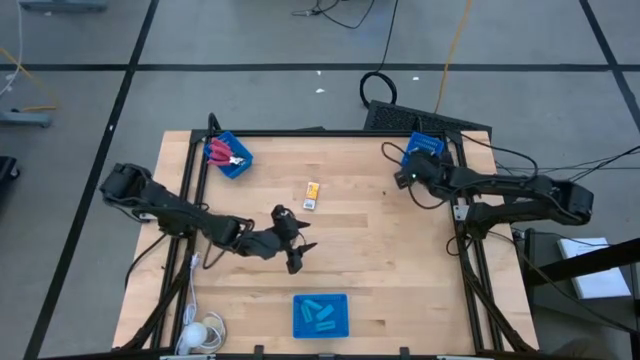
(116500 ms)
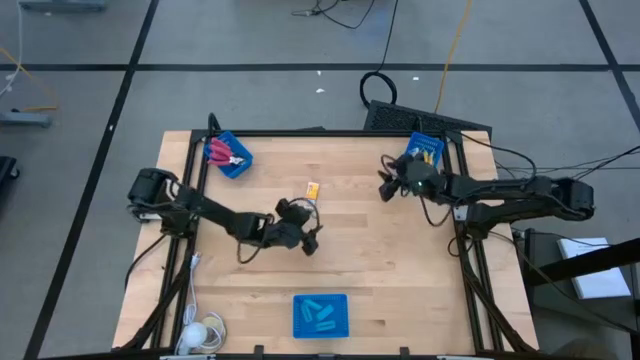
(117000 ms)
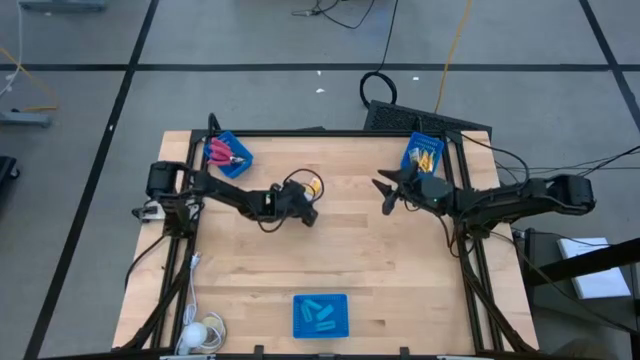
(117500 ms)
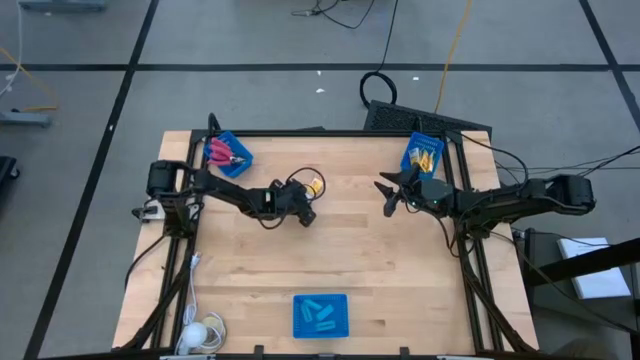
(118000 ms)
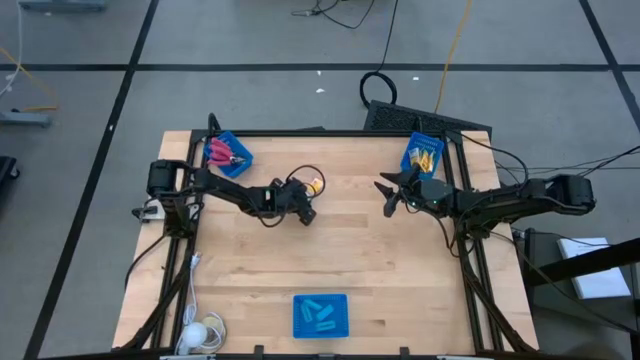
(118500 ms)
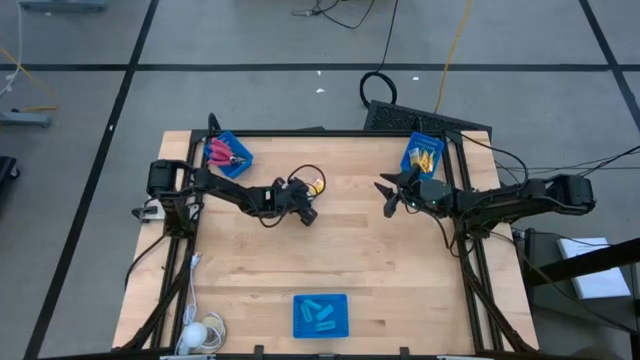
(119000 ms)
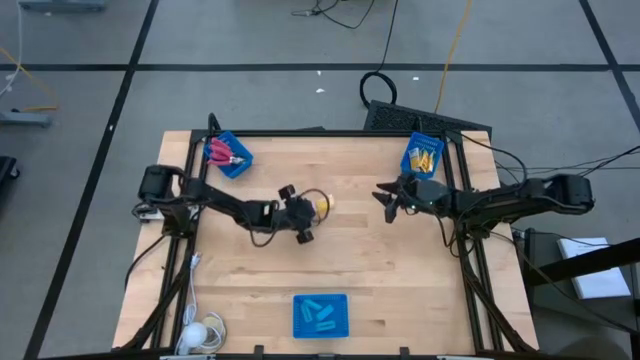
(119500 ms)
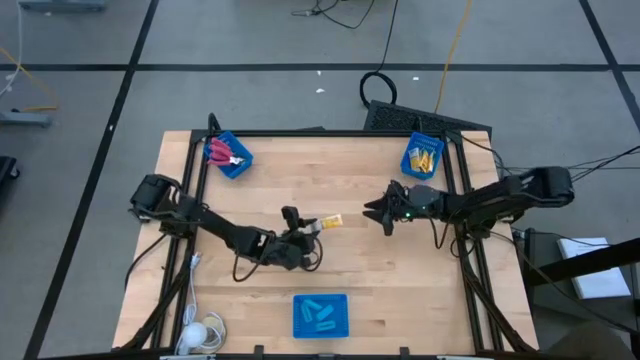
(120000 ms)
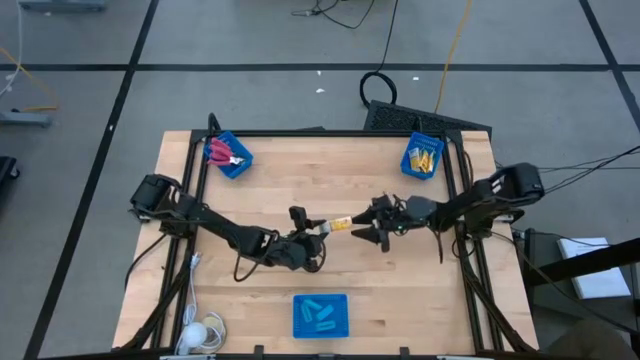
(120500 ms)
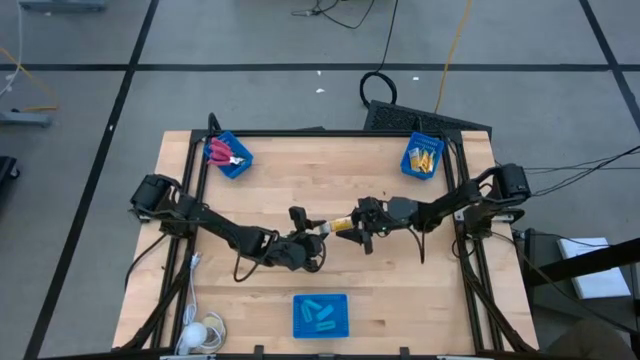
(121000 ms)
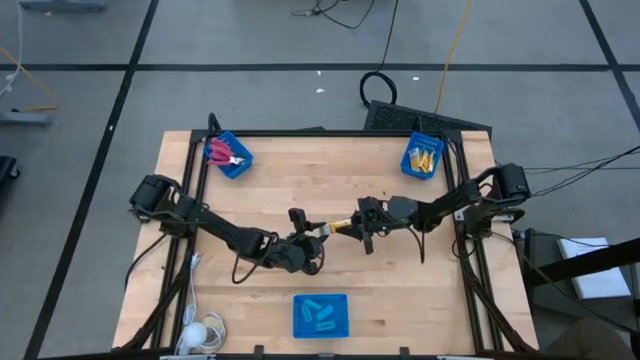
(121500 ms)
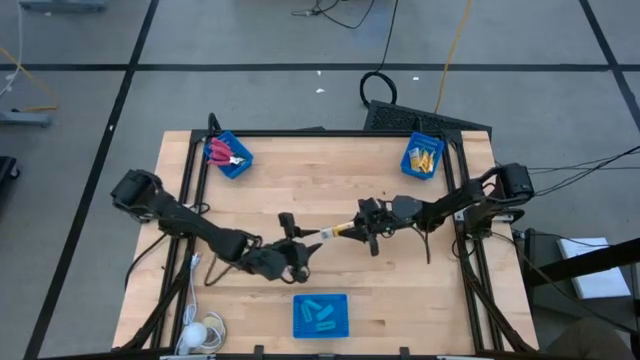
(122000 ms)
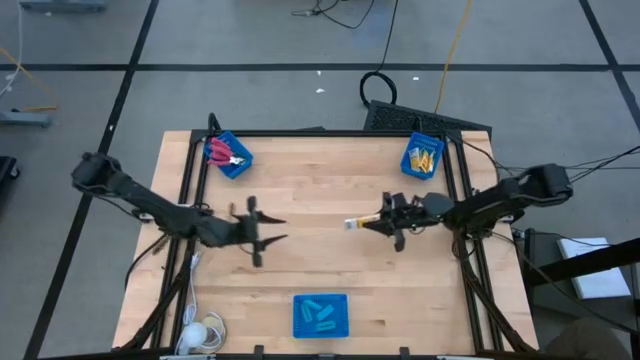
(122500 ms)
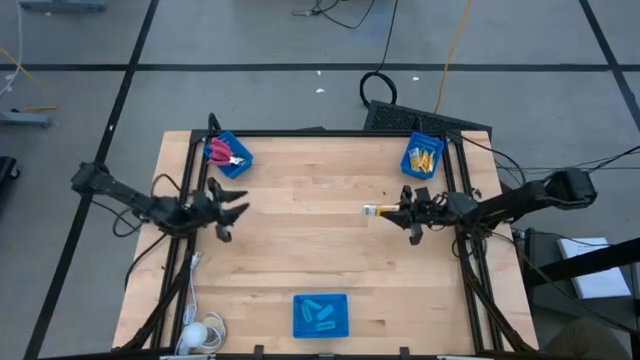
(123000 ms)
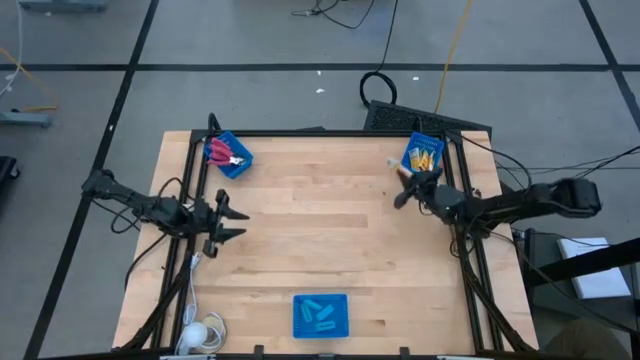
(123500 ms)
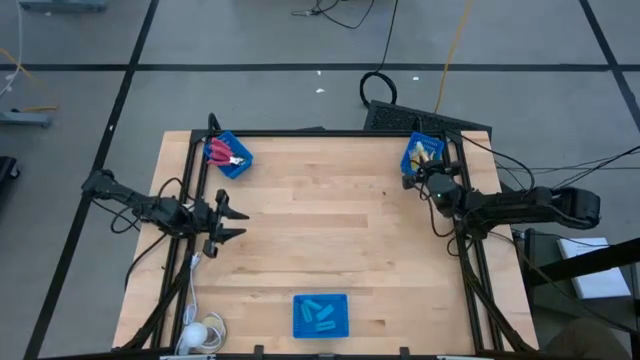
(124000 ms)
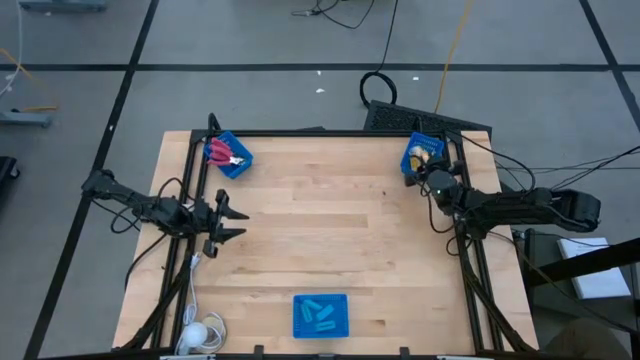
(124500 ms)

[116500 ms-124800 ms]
Task: Pick & Place School Supplies
Put the crayon box into the right blue bin

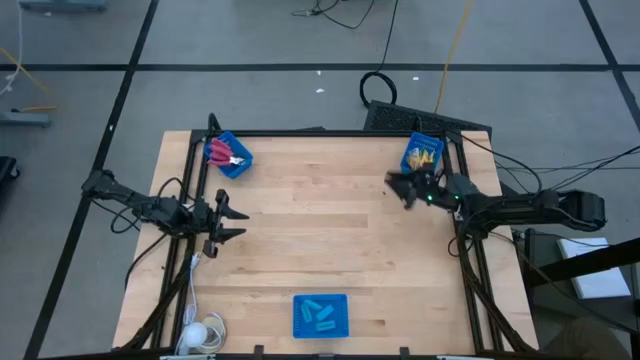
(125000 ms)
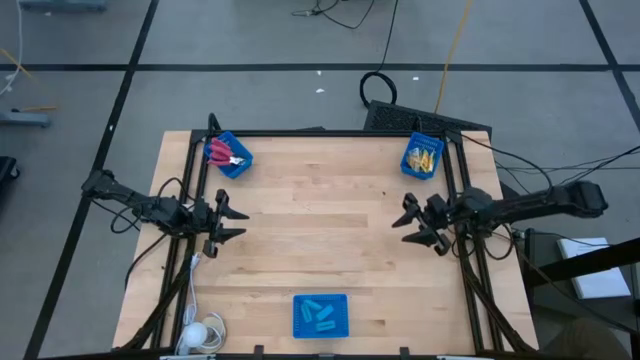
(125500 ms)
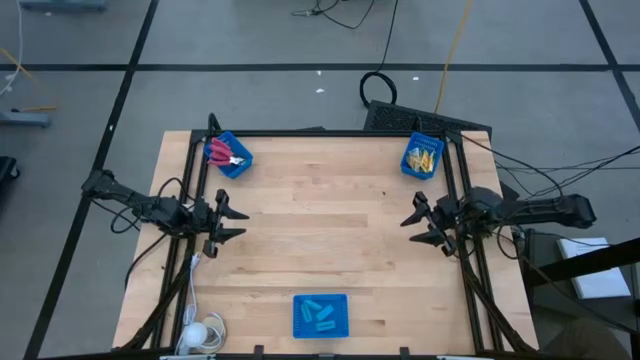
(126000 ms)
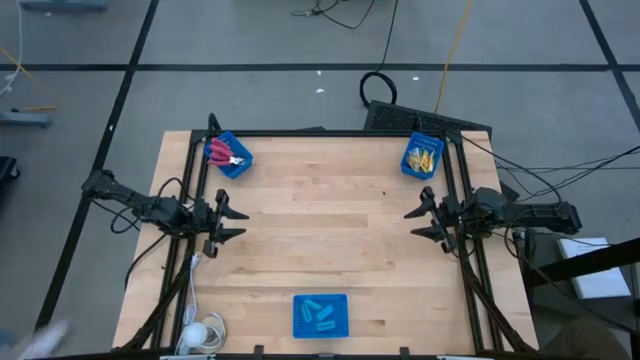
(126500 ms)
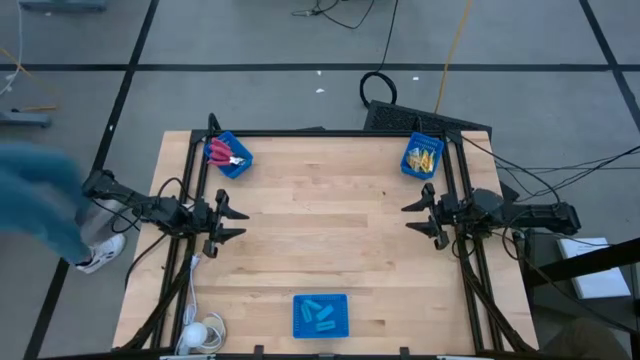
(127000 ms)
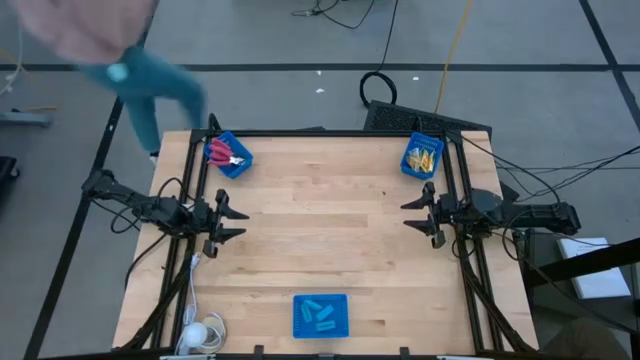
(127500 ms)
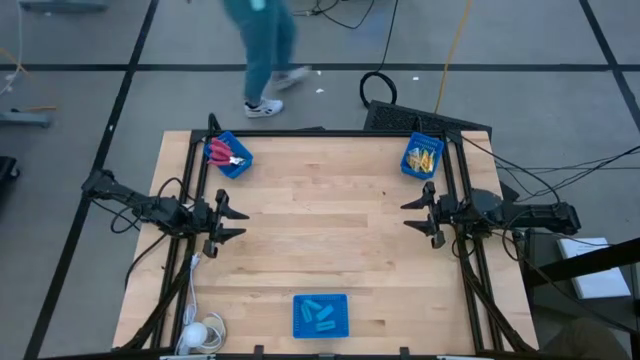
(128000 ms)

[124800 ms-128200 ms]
Return to Home position

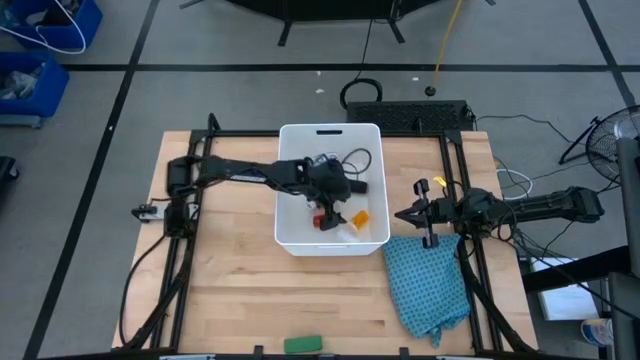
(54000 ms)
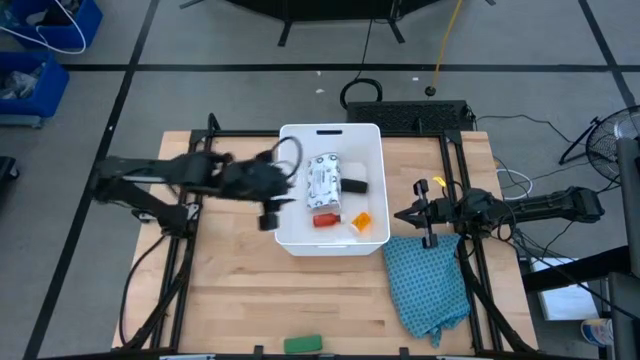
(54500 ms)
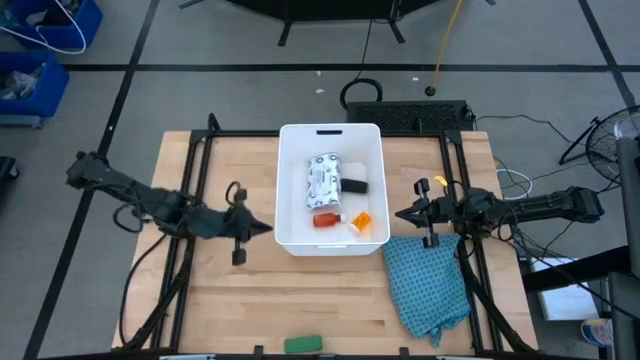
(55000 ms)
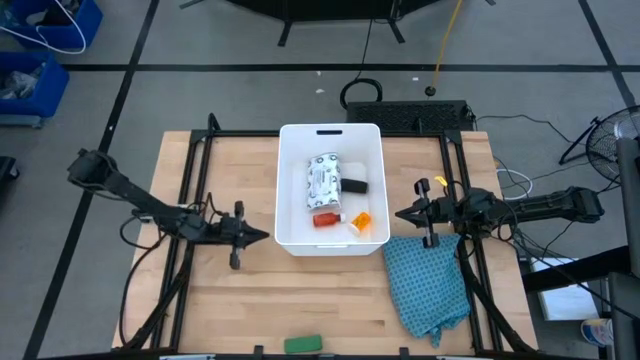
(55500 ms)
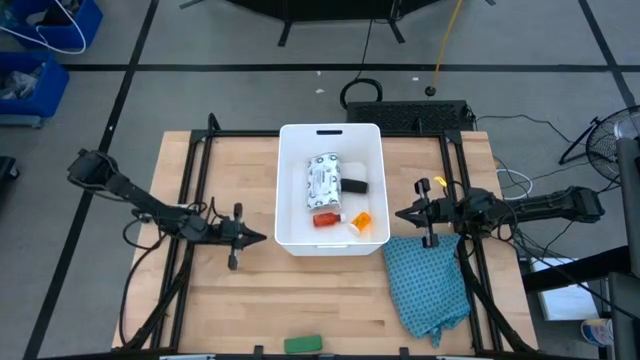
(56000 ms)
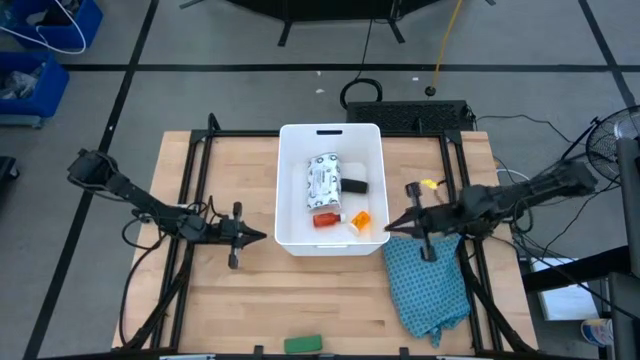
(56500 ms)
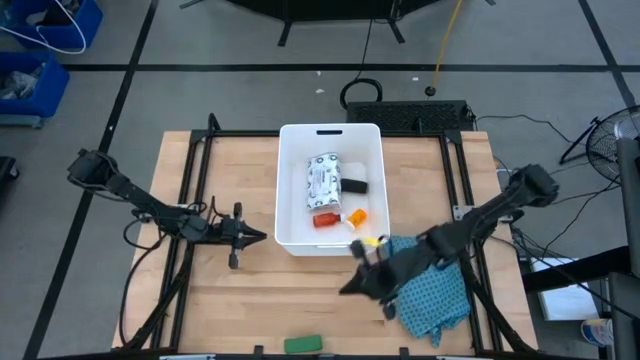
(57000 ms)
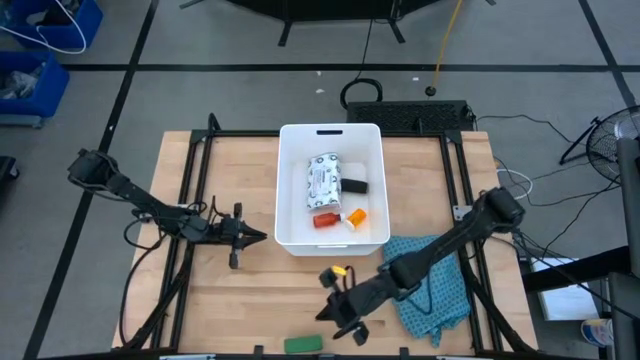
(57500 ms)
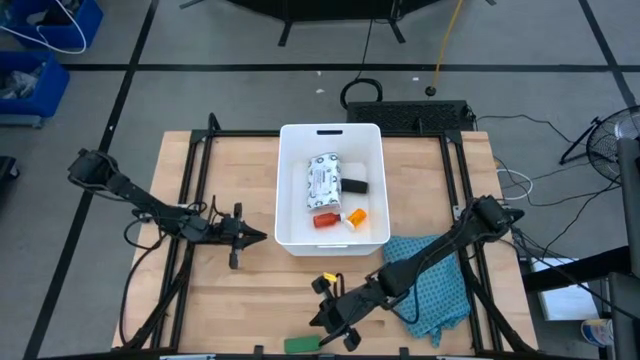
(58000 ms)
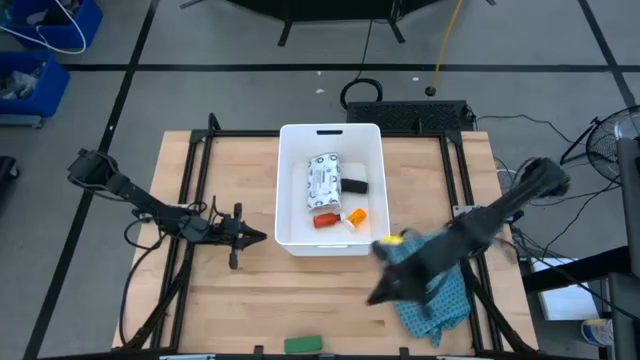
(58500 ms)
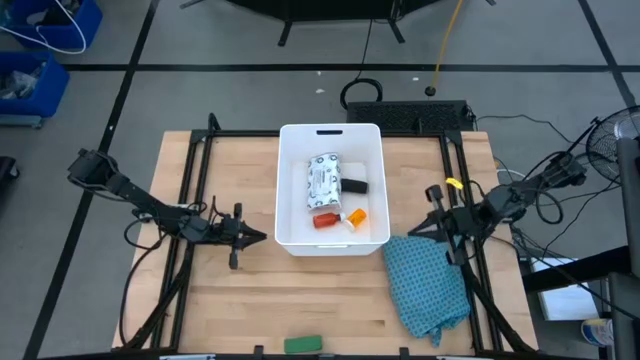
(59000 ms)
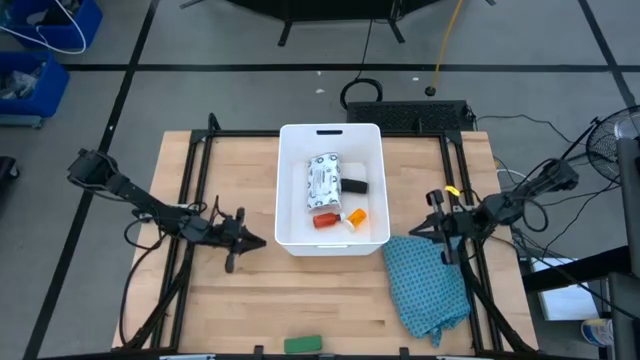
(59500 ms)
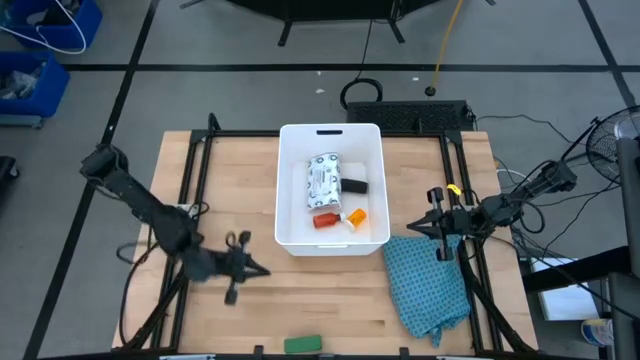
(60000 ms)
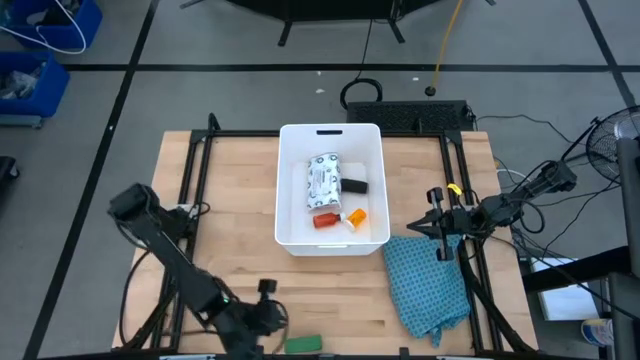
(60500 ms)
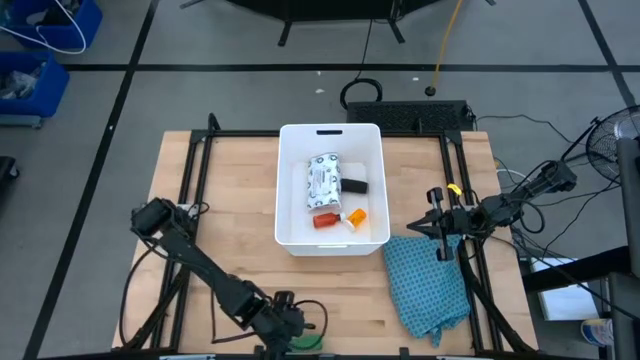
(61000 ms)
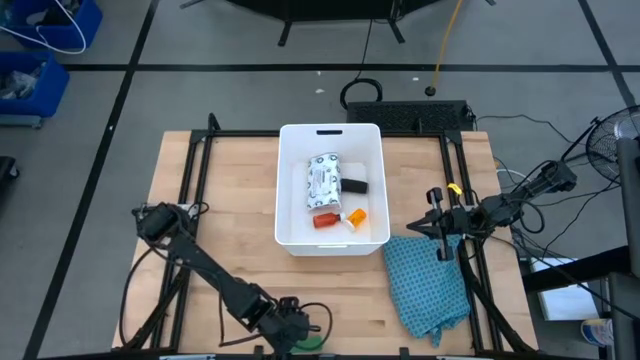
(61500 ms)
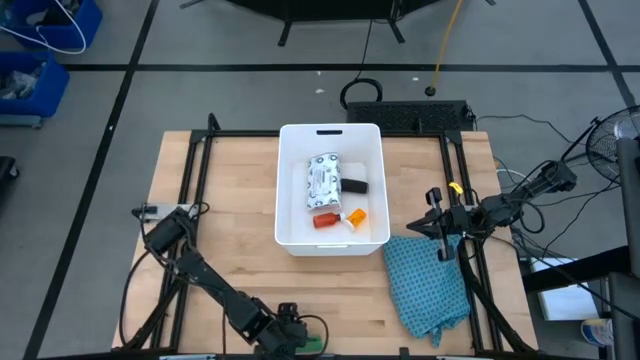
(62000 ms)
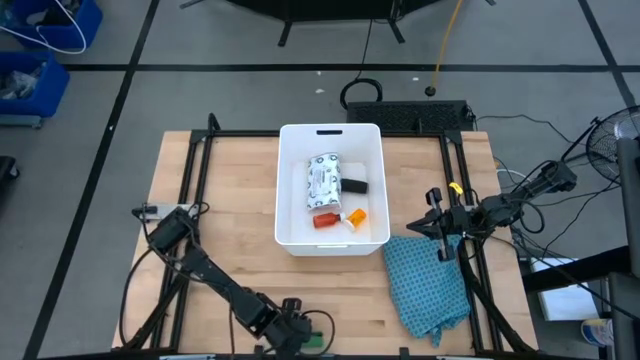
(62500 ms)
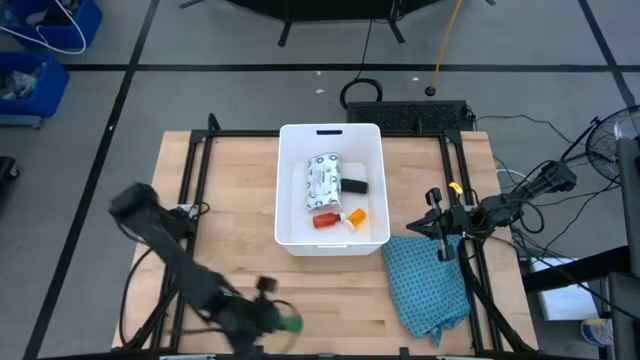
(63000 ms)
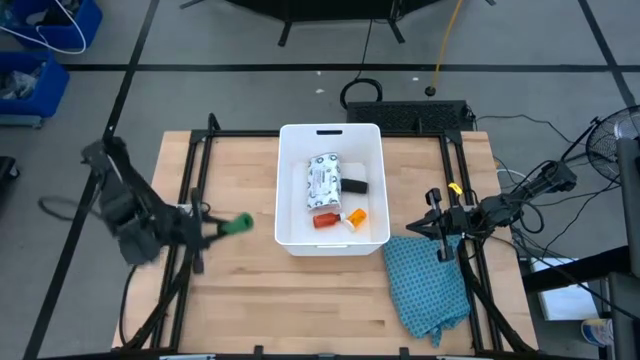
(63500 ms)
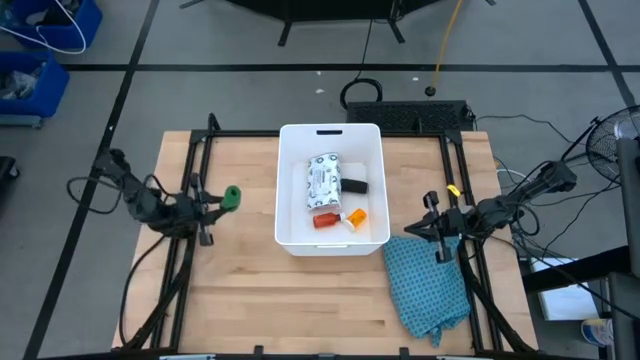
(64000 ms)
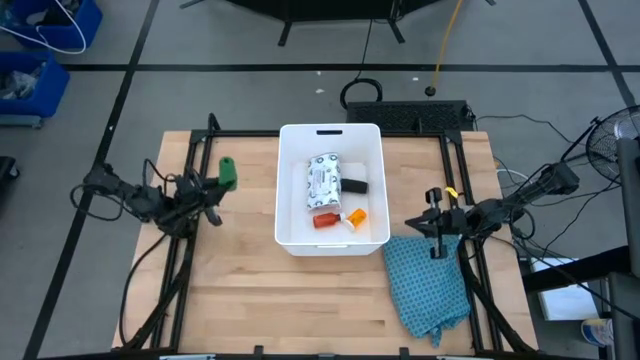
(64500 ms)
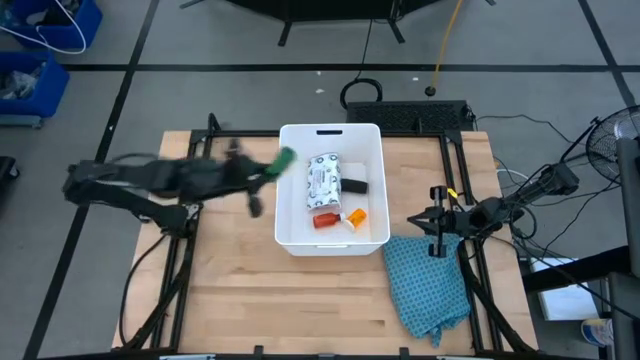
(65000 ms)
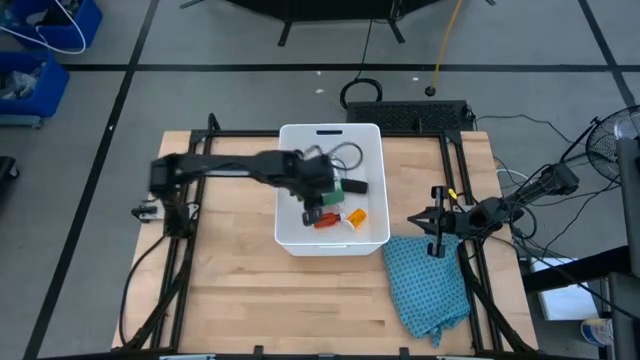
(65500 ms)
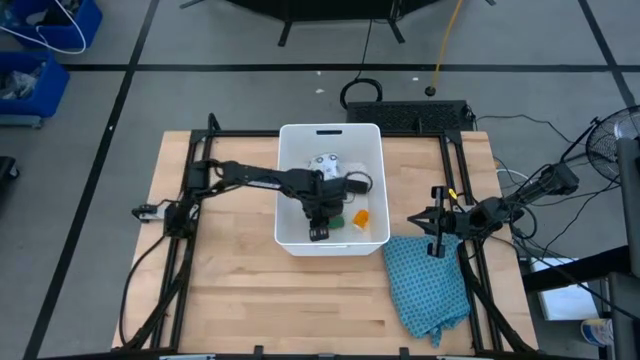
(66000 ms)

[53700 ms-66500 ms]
Task: Pick & place medical supplies in basket/bin
Put the green bandage into the white bin
